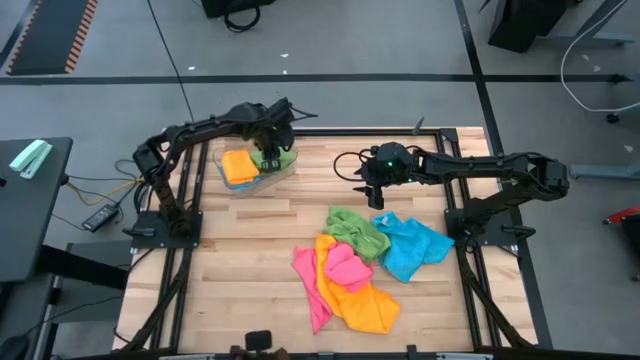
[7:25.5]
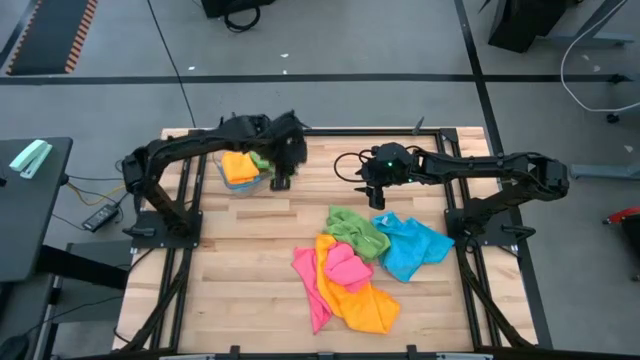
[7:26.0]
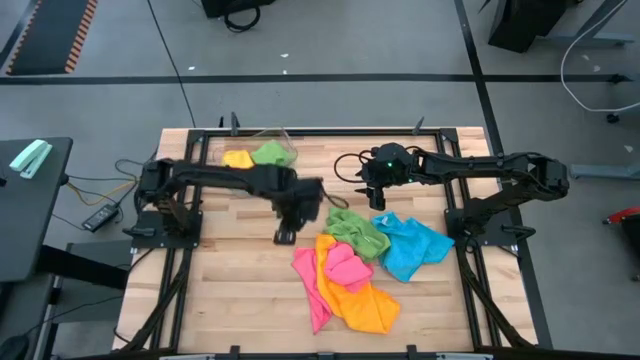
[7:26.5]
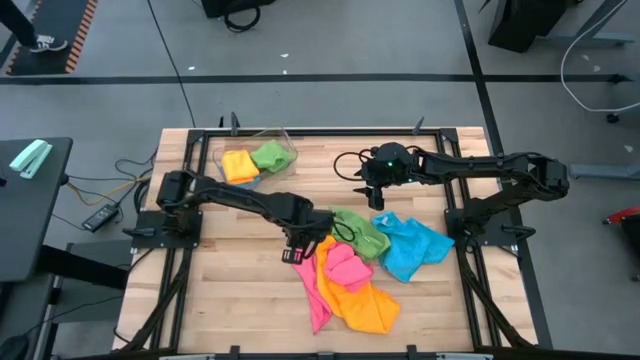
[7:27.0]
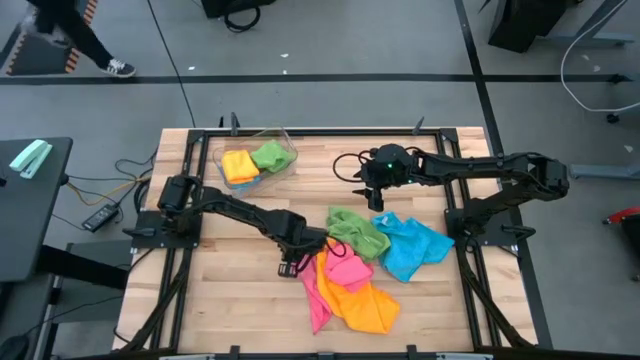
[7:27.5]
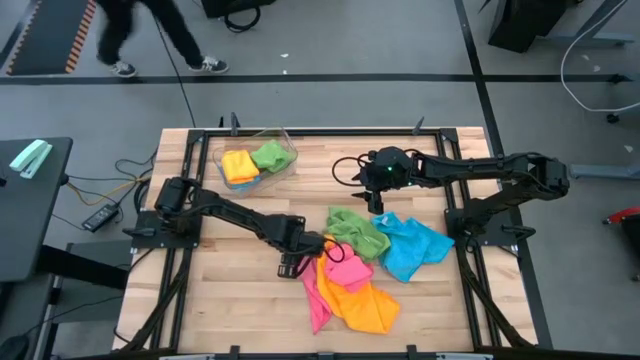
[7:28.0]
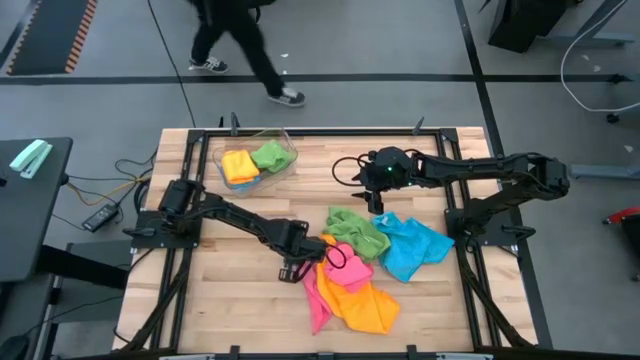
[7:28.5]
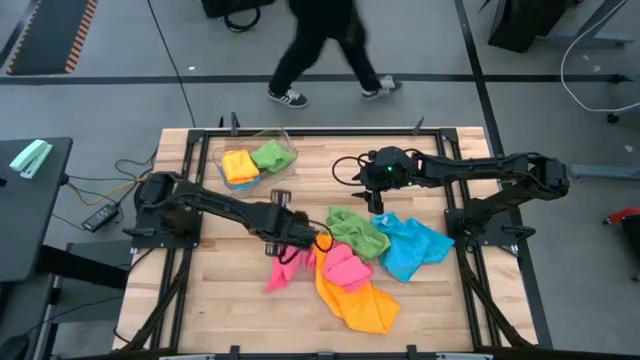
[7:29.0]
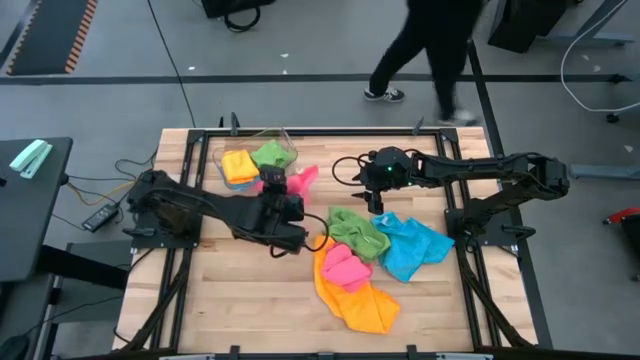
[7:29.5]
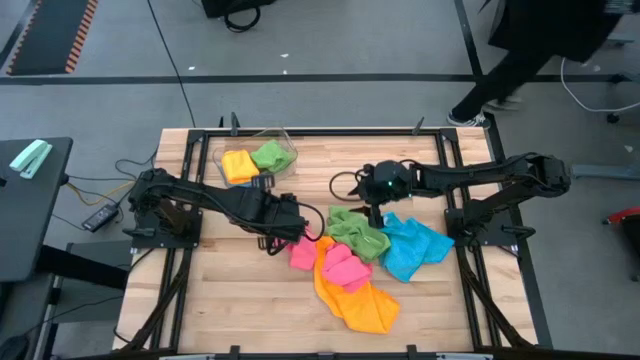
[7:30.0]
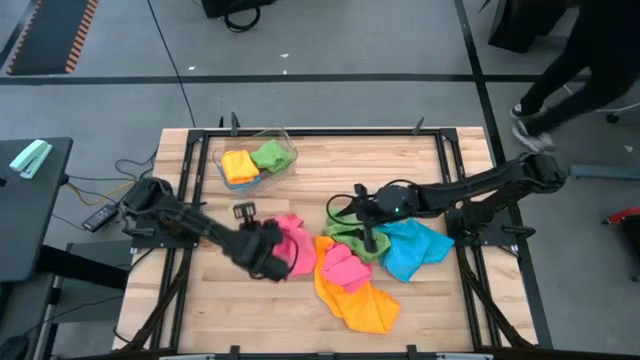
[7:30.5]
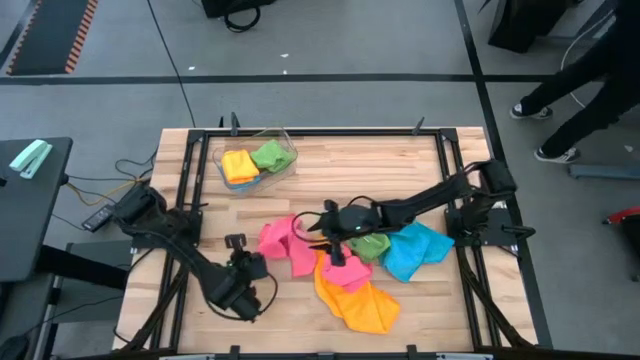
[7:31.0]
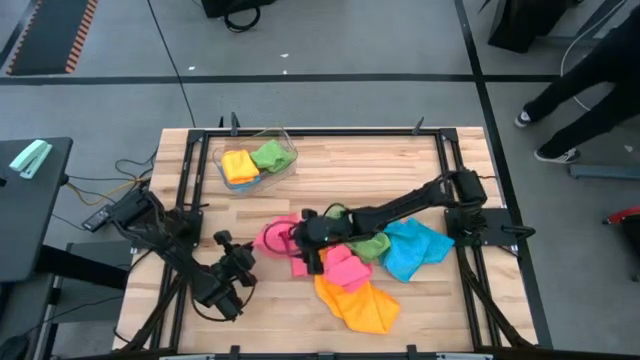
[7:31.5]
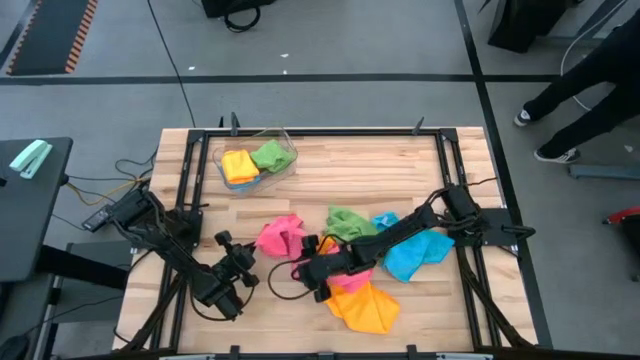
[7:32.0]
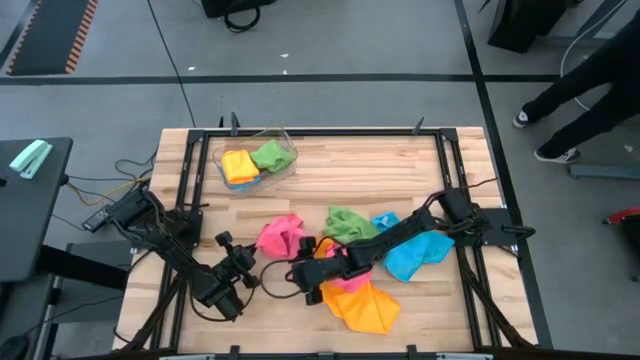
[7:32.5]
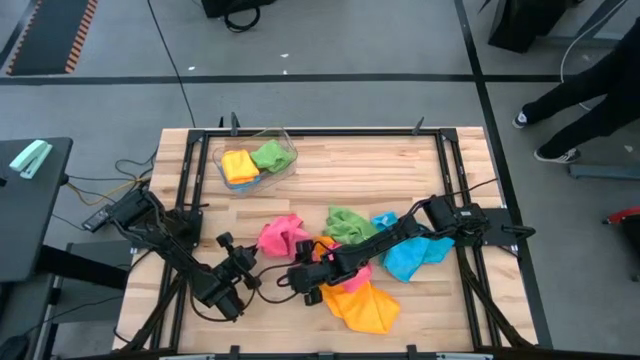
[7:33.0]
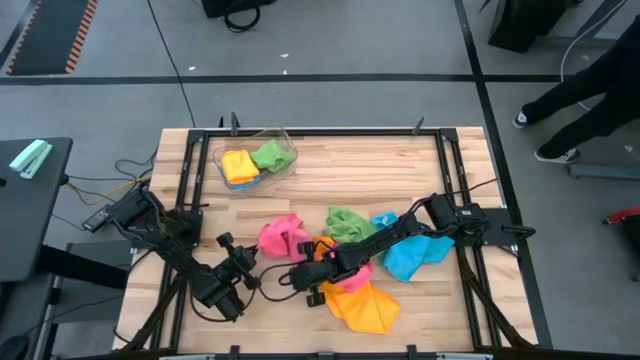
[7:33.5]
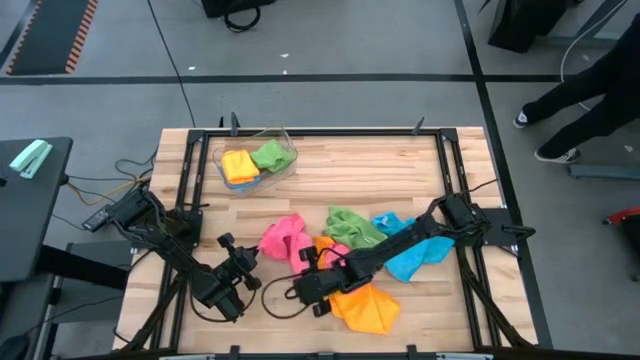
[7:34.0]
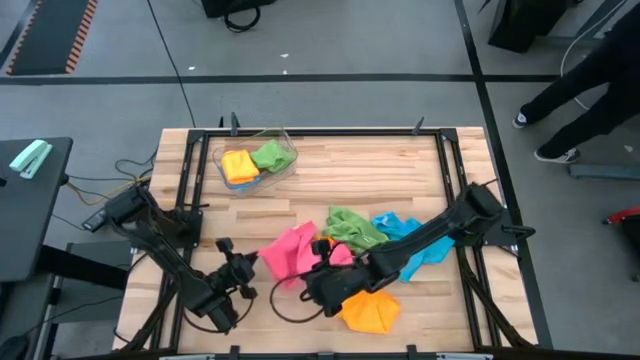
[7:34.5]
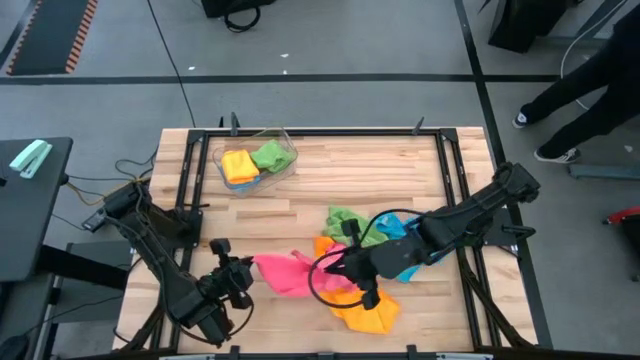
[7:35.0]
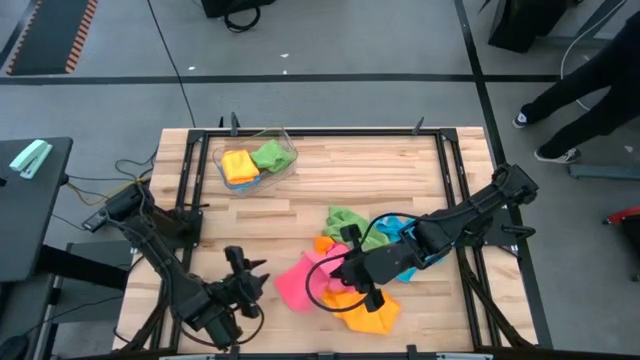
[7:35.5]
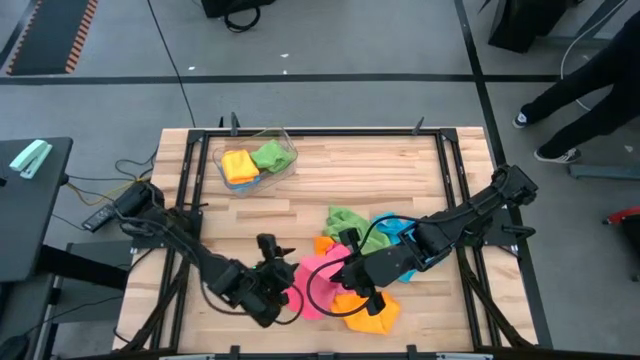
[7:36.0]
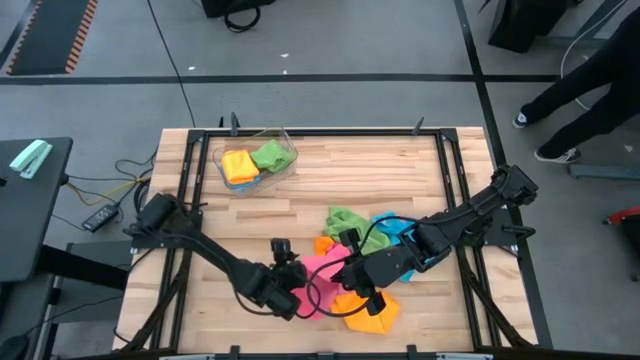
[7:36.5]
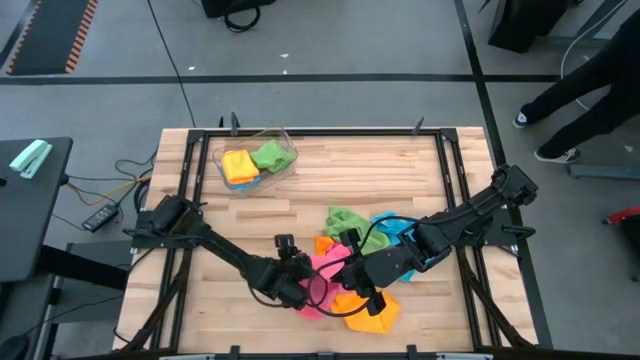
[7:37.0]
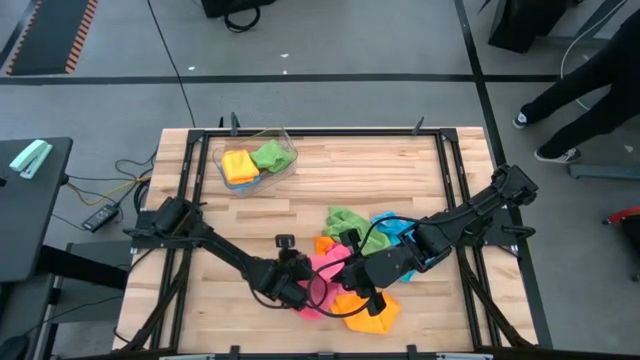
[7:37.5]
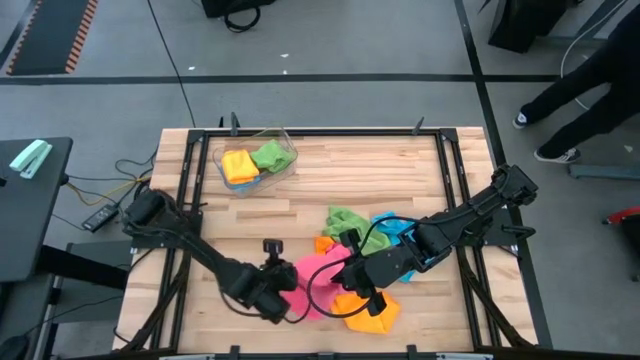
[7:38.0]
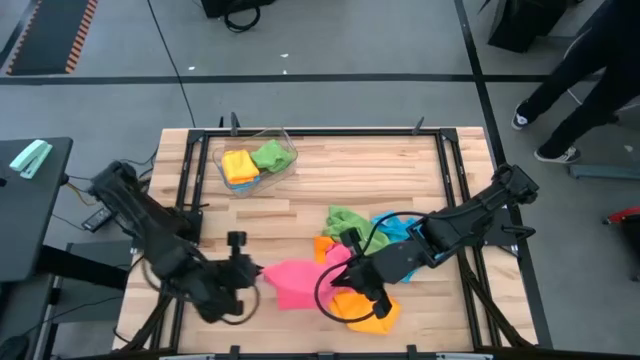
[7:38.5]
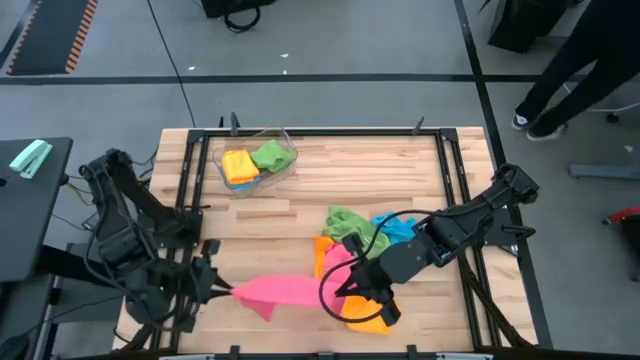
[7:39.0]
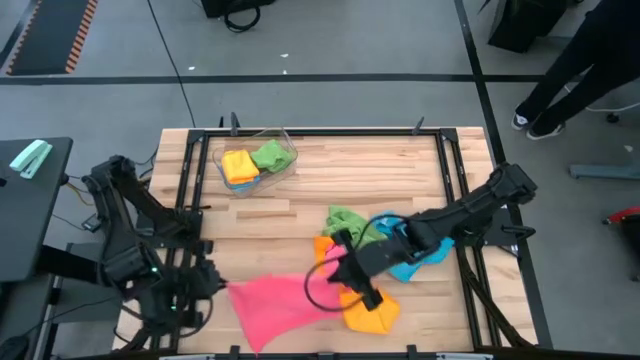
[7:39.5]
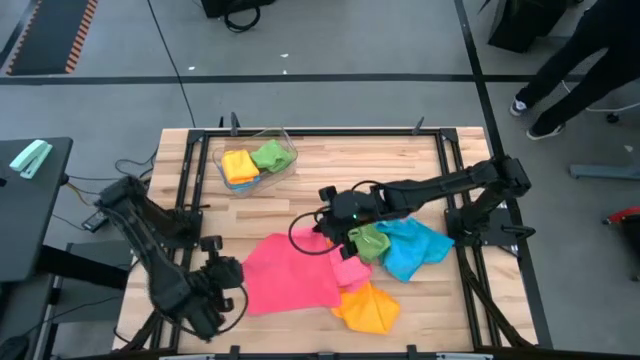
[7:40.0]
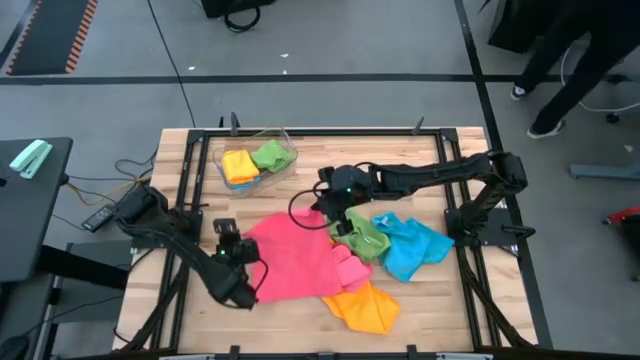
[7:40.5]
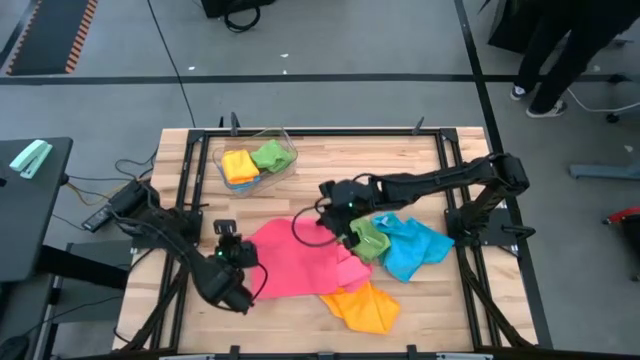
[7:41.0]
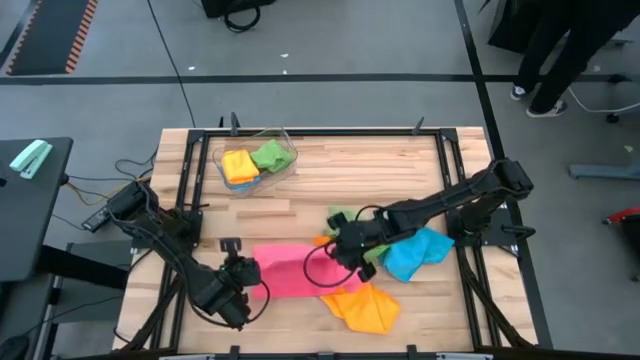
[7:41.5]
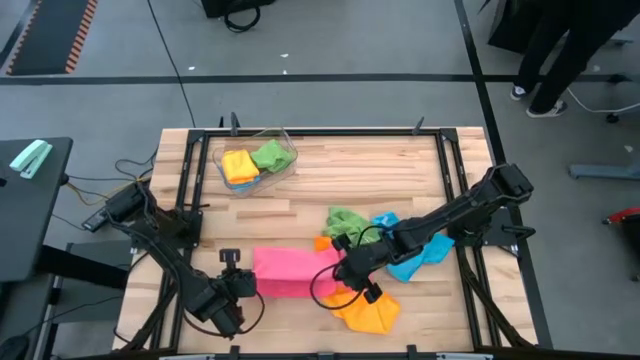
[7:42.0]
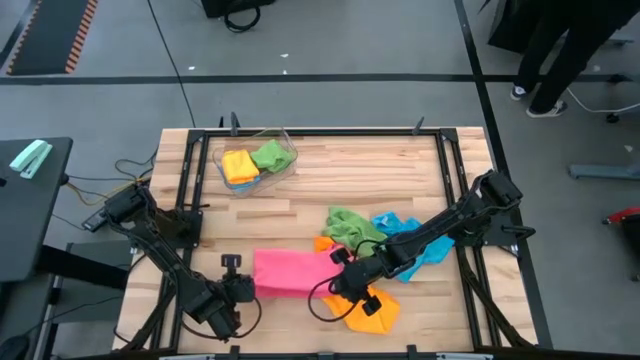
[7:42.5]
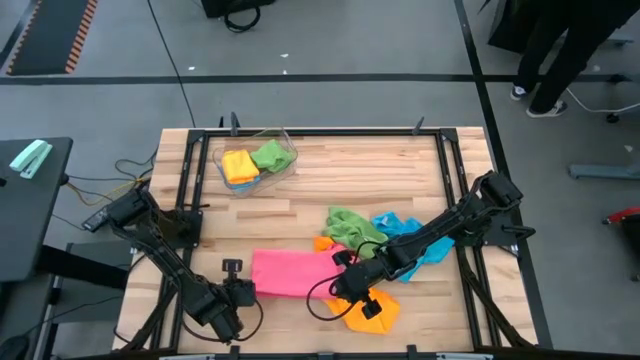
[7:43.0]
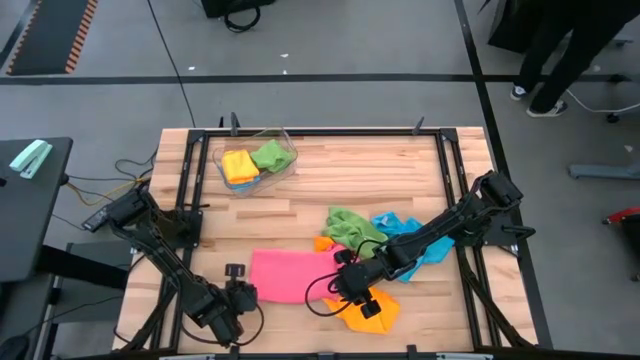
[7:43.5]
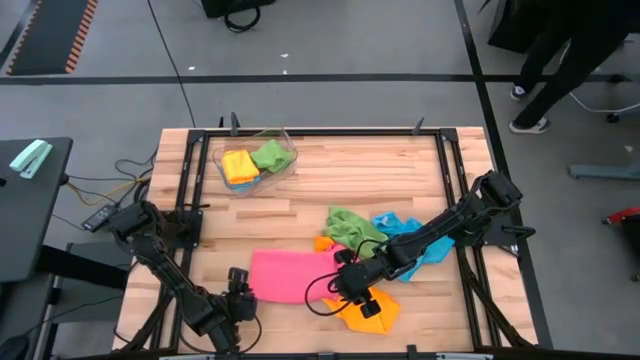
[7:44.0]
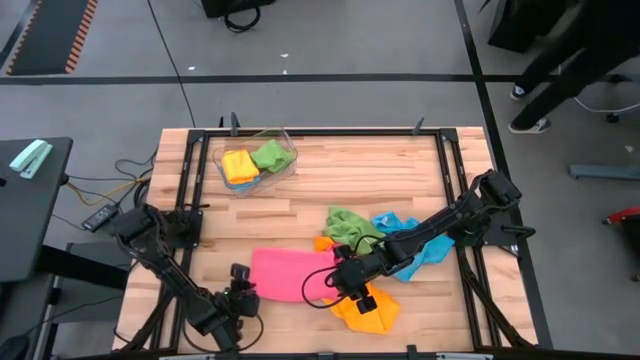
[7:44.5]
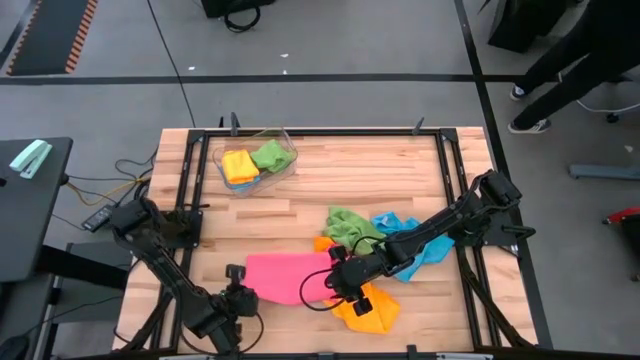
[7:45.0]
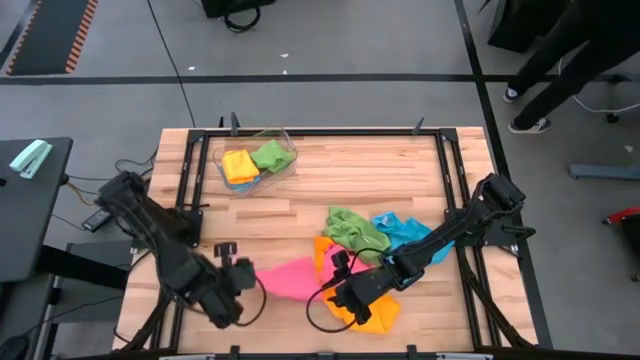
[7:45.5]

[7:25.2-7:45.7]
Task: Fold microfiber towels
Fold the left pink microfiber towel
